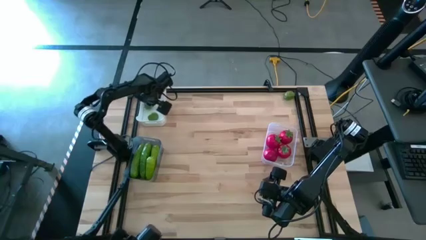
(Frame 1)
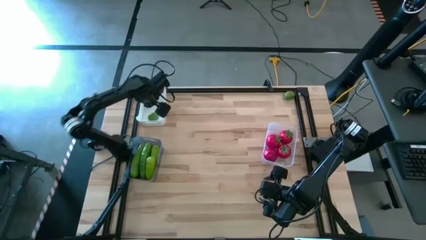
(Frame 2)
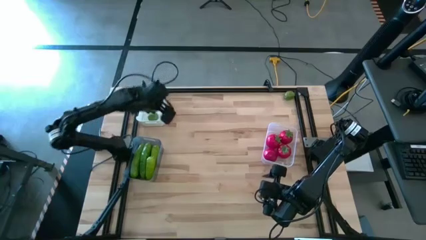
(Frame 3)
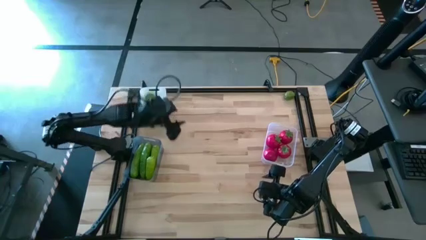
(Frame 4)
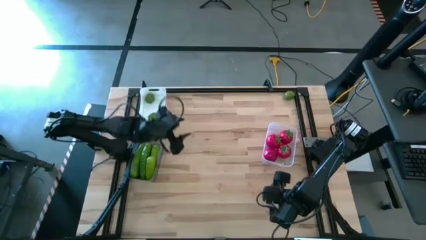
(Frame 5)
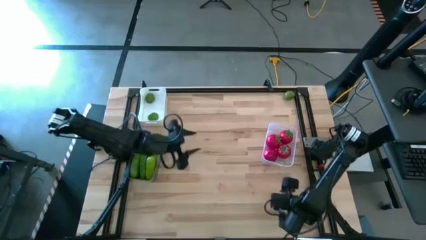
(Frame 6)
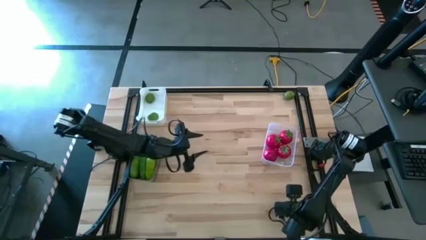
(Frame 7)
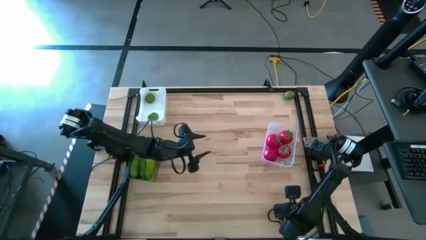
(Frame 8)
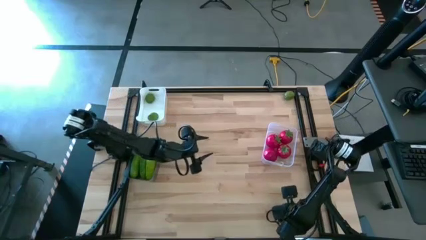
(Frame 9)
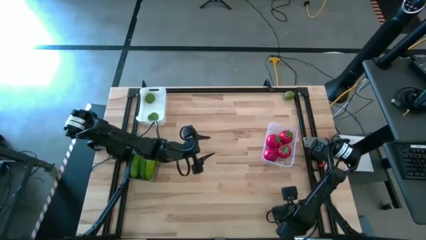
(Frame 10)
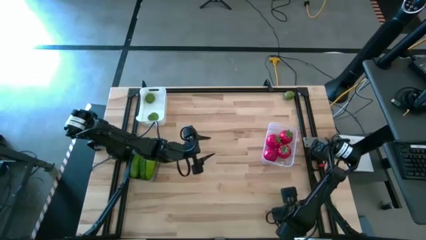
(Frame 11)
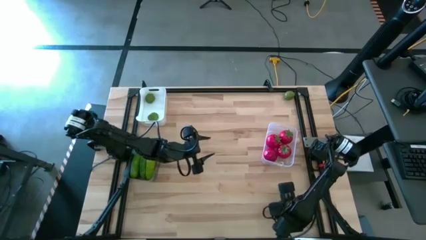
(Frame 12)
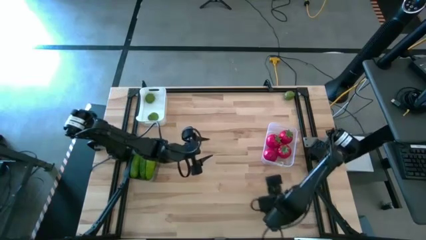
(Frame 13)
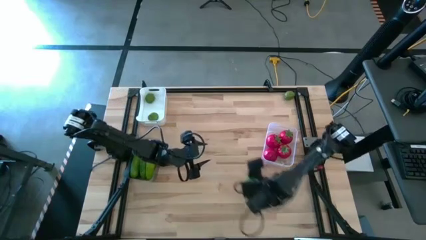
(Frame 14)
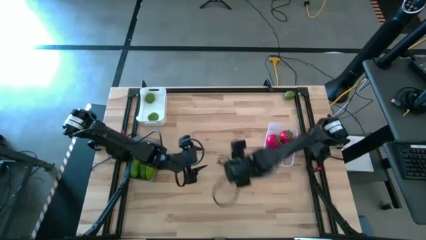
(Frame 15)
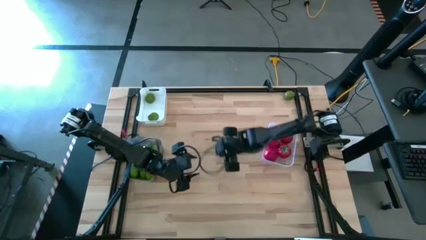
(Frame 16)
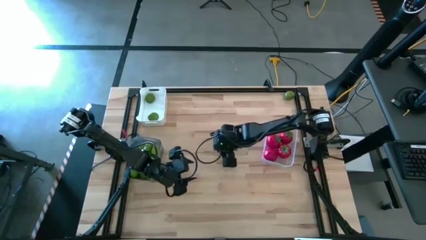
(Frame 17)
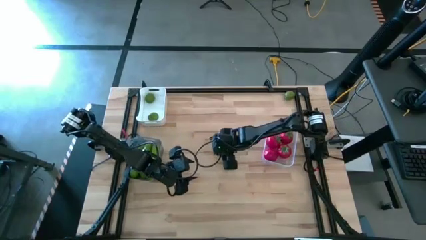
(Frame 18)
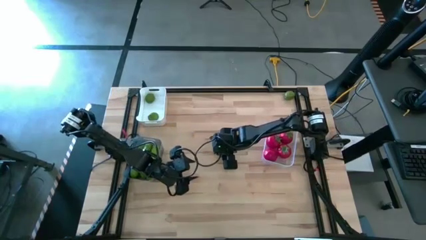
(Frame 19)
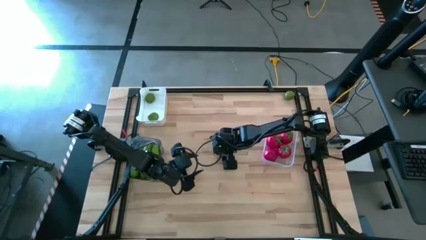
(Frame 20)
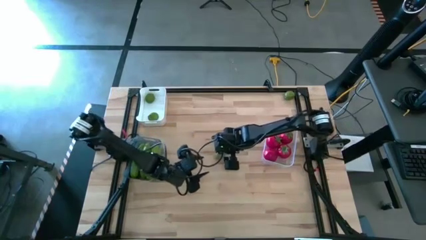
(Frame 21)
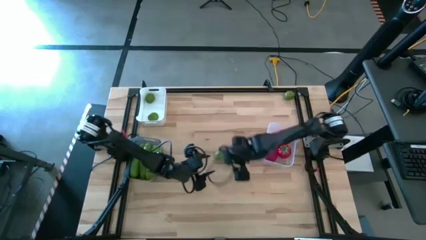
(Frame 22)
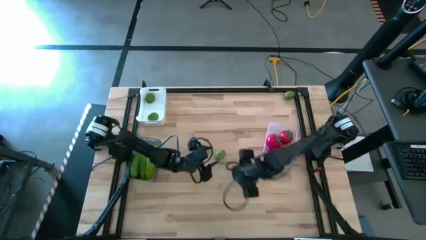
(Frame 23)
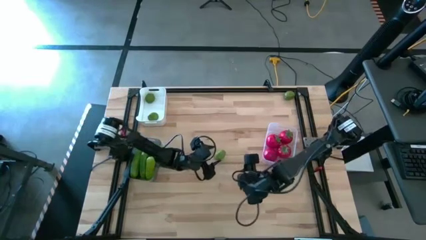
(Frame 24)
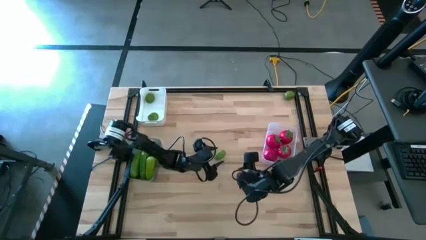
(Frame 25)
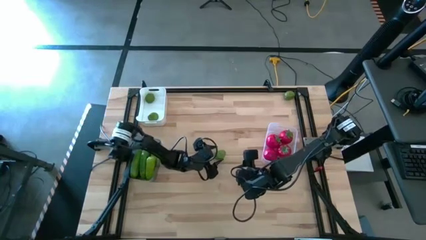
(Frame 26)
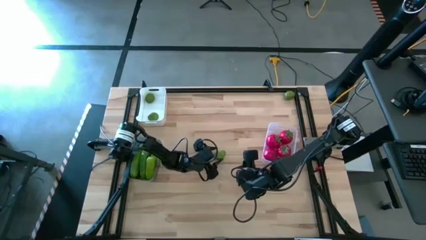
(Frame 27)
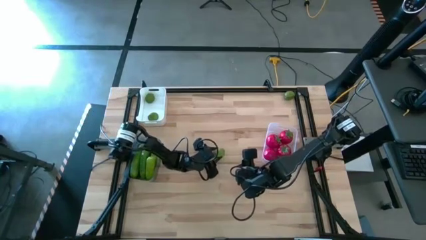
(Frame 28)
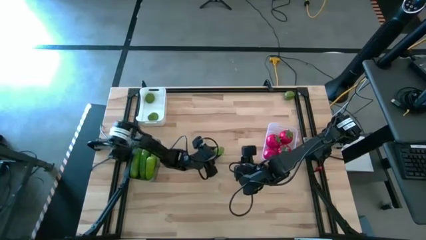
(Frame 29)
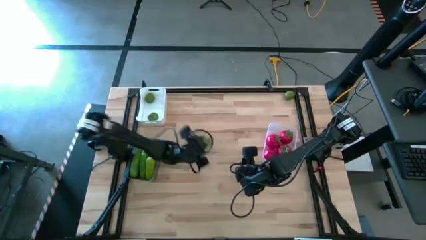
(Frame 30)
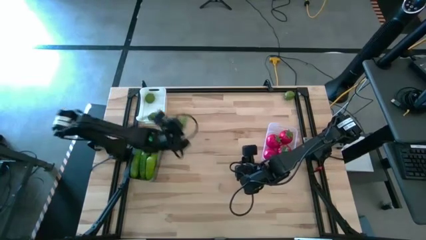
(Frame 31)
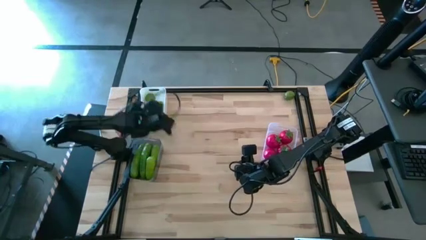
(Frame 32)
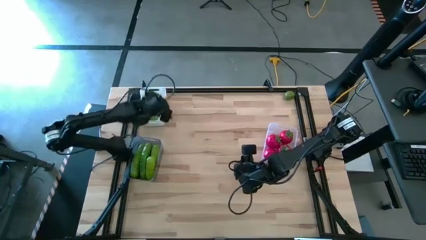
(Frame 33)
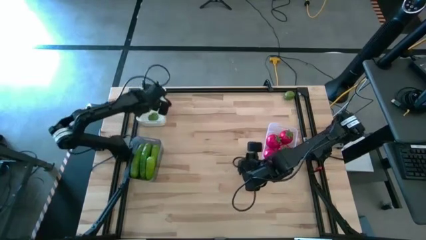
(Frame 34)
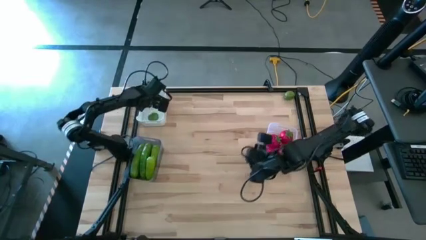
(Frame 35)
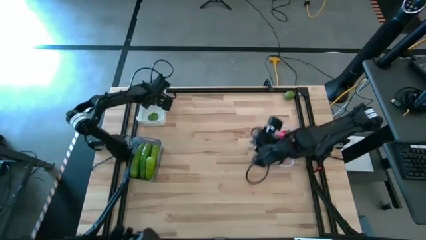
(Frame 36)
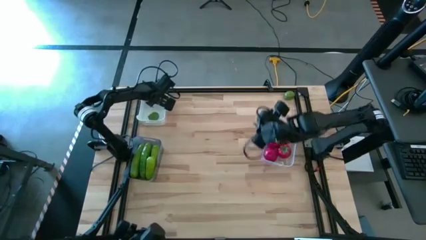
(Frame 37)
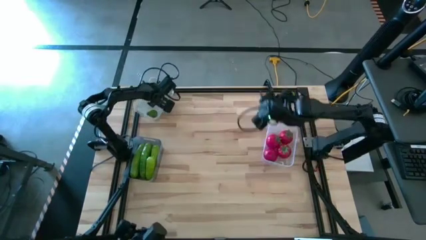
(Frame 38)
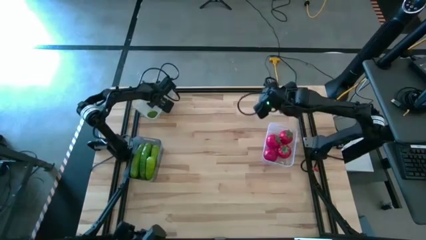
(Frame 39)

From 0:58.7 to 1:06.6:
Task: Sort produce into baskets
Put the lime into the white bin

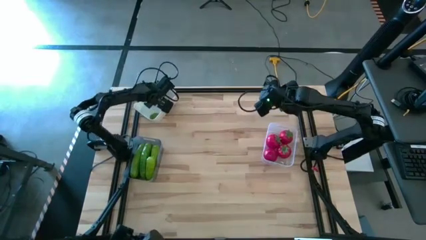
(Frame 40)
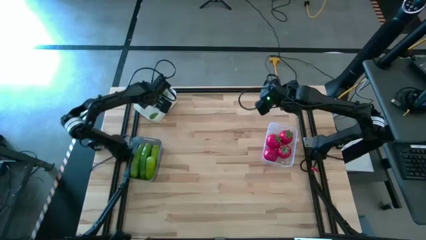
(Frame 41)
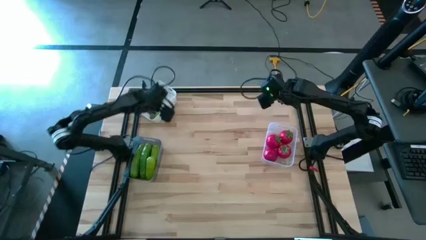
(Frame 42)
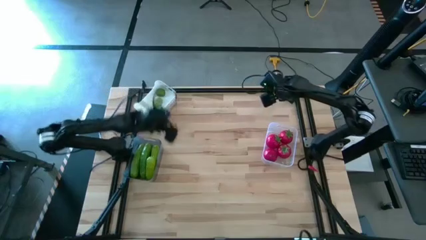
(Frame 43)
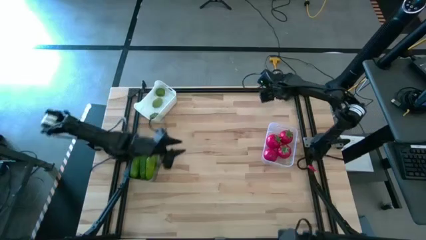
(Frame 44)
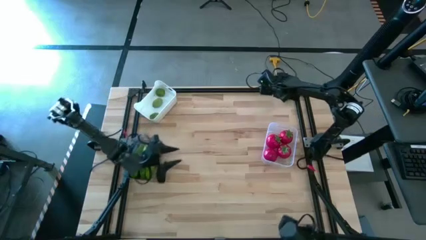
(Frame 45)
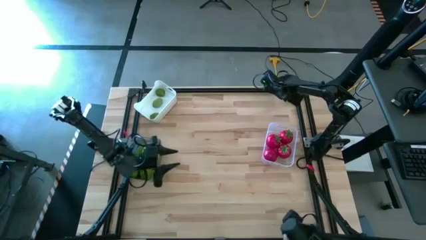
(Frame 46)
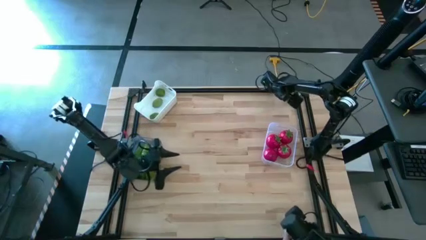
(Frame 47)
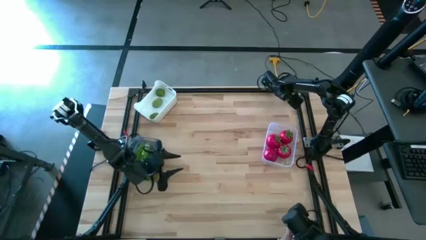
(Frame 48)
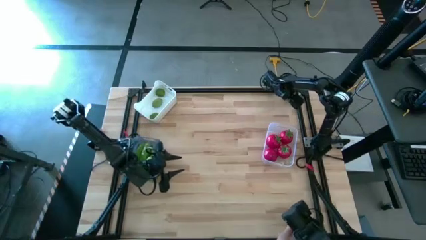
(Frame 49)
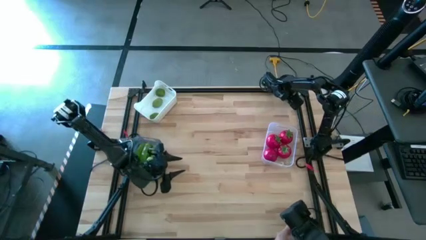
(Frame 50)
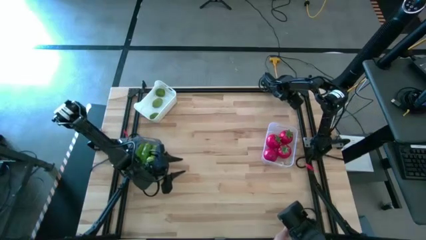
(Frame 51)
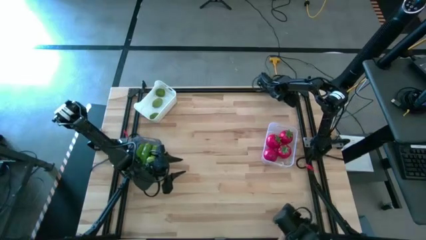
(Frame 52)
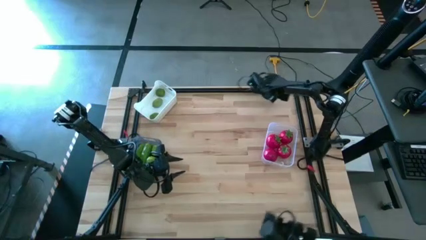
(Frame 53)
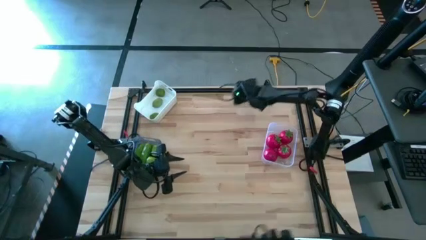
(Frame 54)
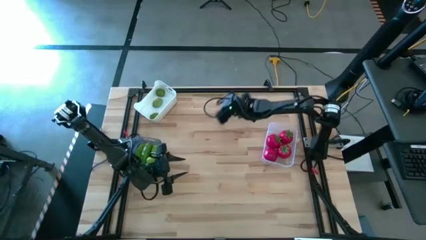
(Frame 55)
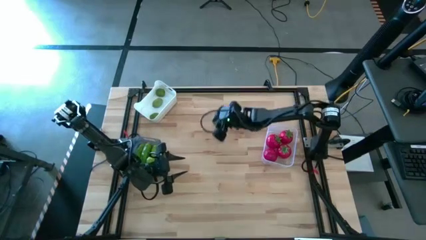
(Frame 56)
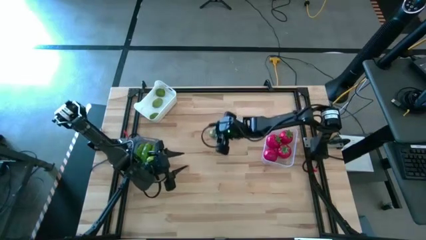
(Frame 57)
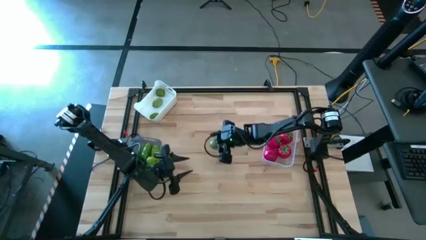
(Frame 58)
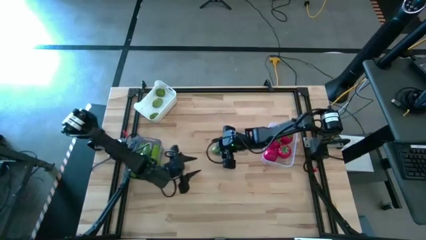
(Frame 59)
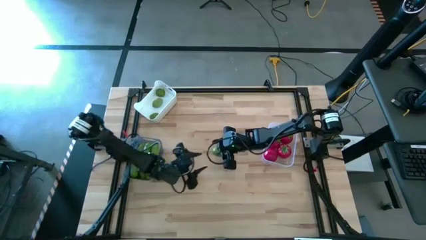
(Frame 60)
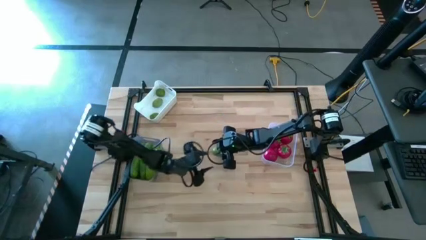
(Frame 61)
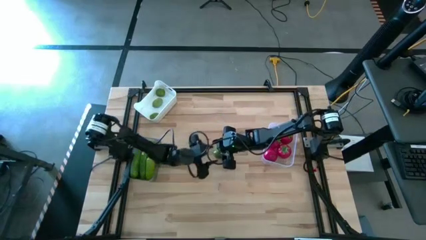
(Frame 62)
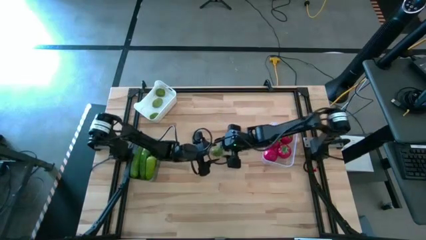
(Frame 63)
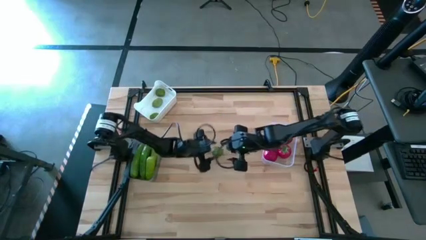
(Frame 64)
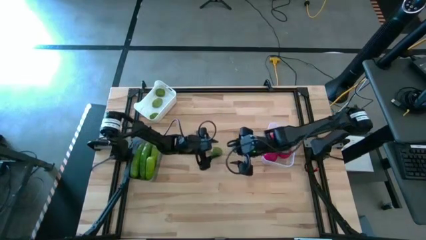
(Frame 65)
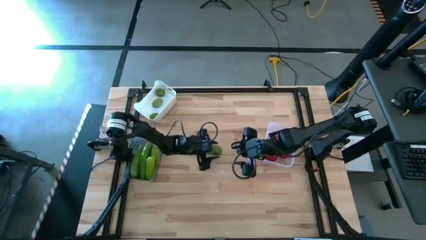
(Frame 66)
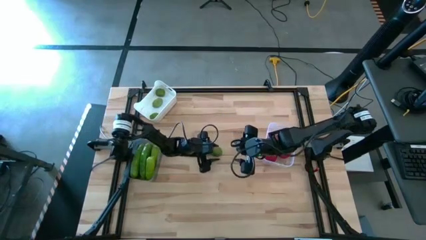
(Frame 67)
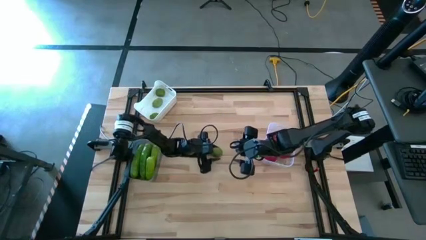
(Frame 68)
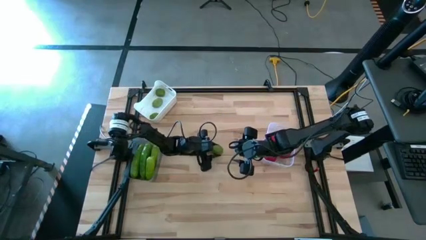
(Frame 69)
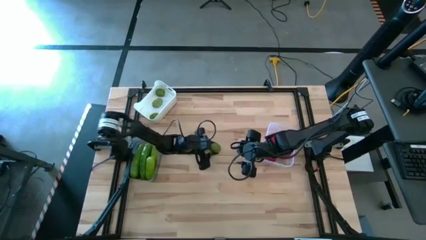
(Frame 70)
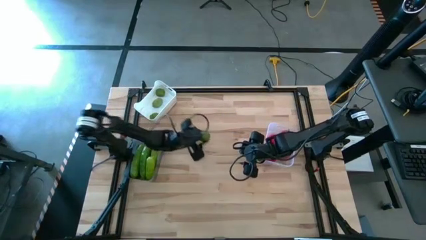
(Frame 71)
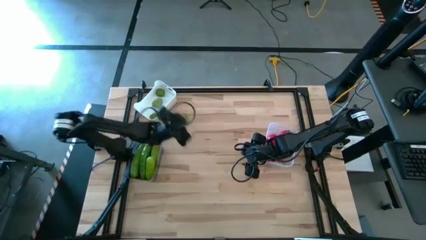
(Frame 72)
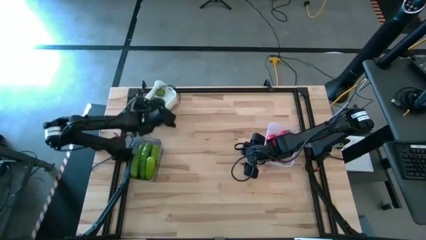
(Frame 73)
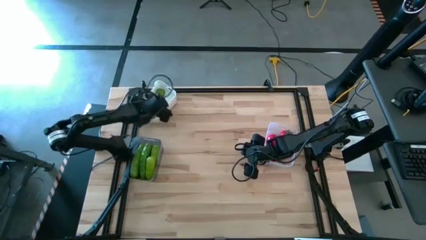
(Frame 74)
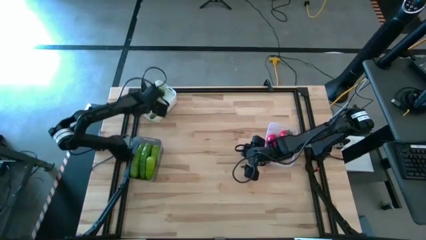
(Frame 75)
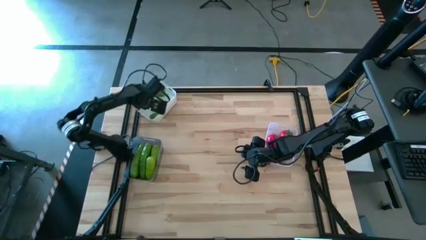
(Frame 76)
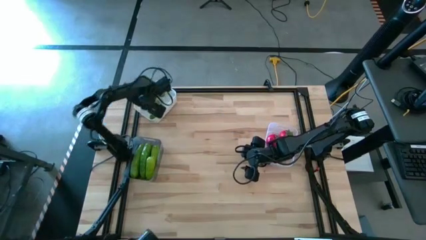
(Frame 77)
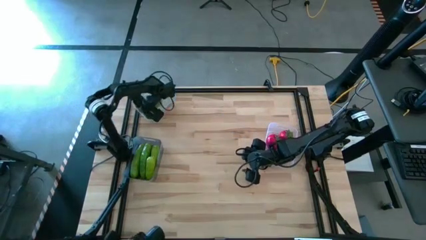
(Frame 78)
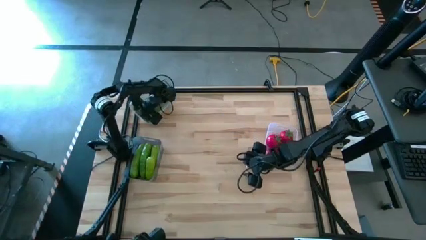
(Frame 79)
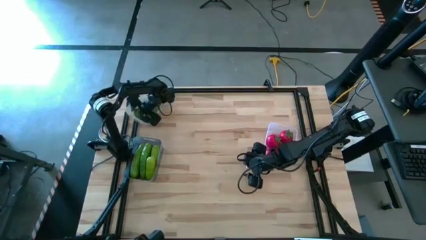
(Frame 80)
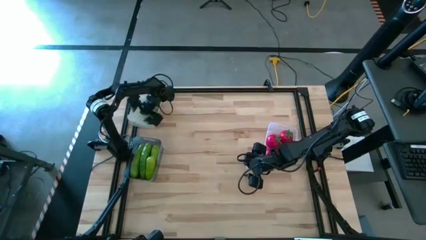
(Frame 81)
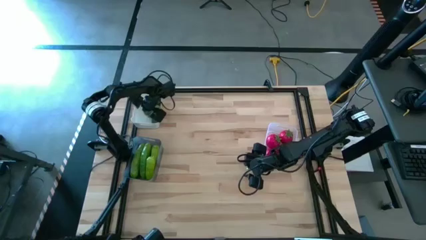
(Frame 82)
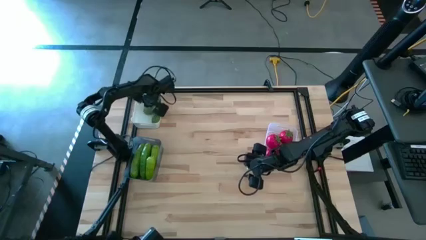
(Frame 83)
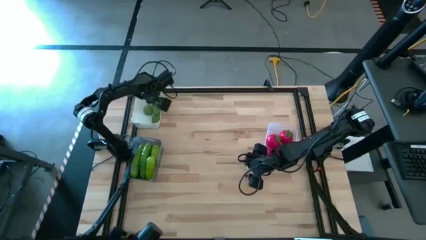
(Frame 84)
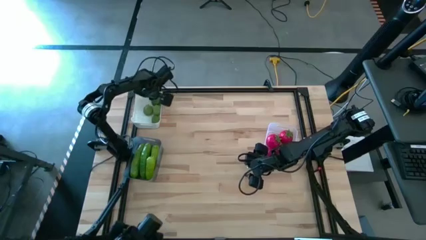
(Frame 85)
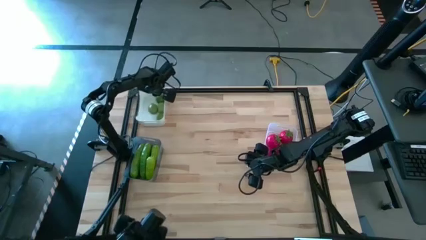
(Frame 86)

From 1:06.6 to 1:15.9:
Put the lime into the white bin
